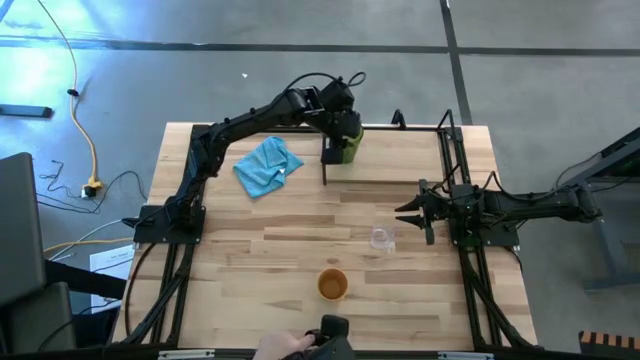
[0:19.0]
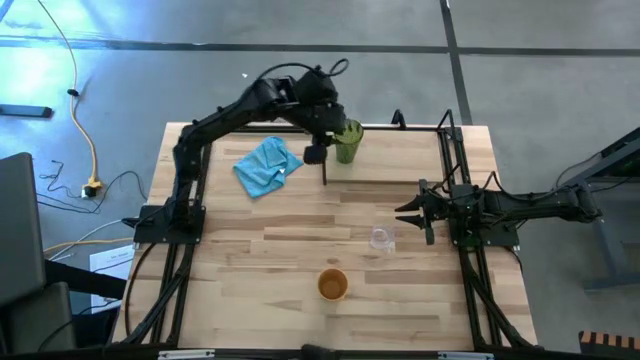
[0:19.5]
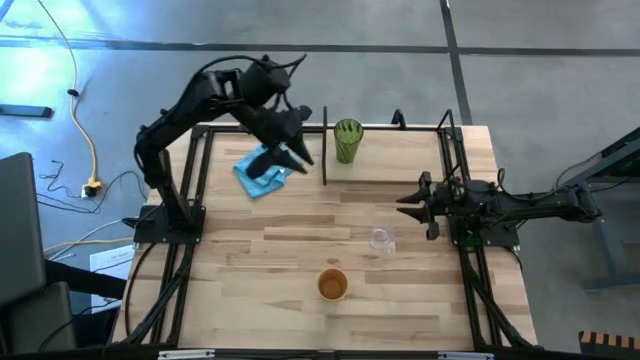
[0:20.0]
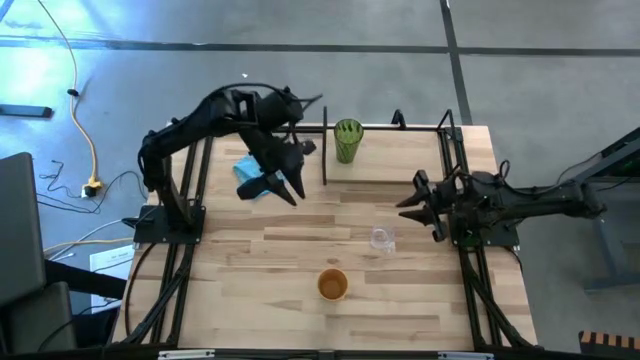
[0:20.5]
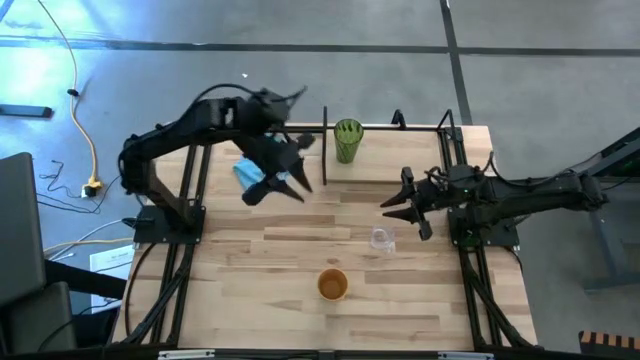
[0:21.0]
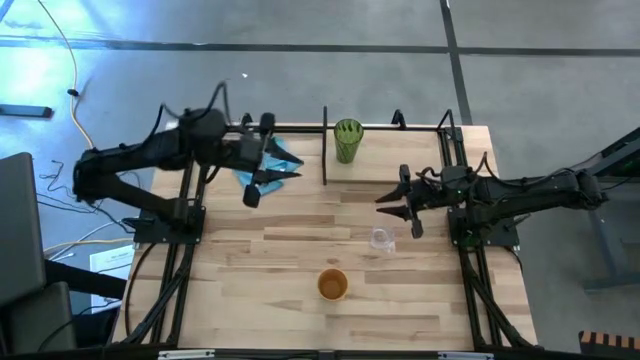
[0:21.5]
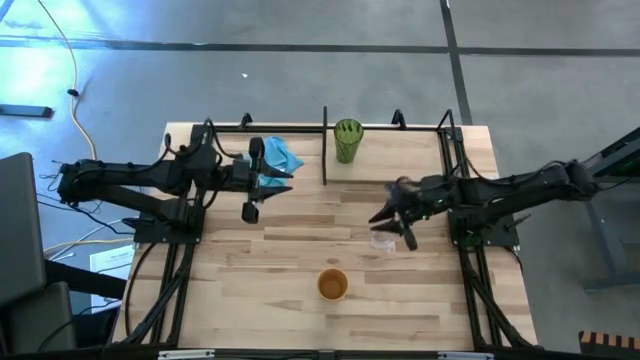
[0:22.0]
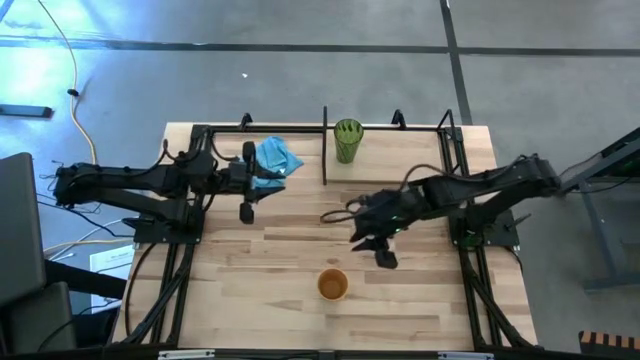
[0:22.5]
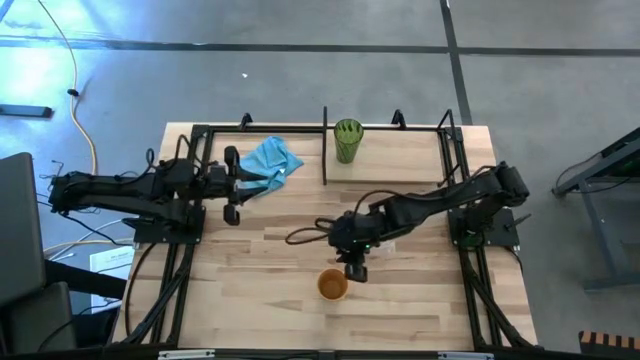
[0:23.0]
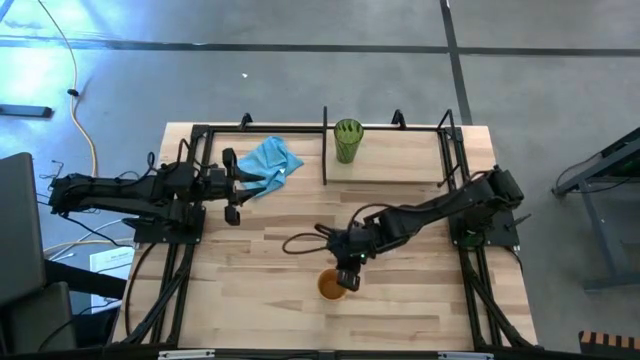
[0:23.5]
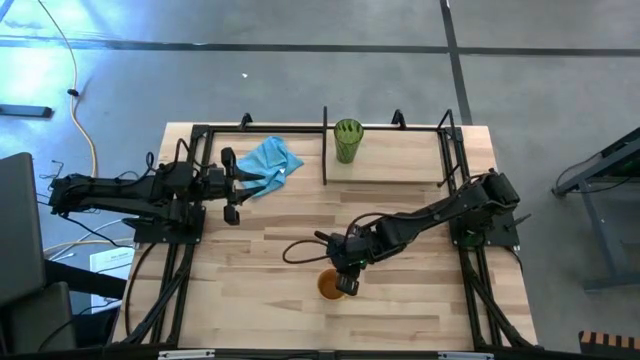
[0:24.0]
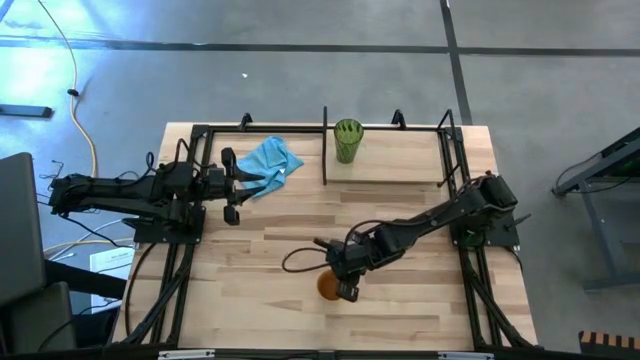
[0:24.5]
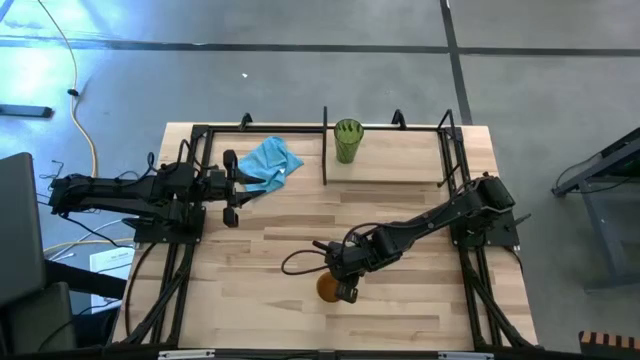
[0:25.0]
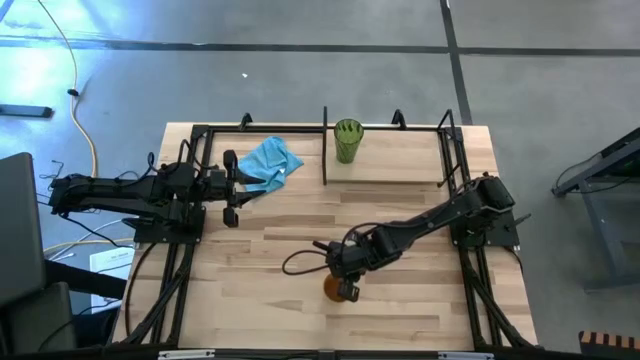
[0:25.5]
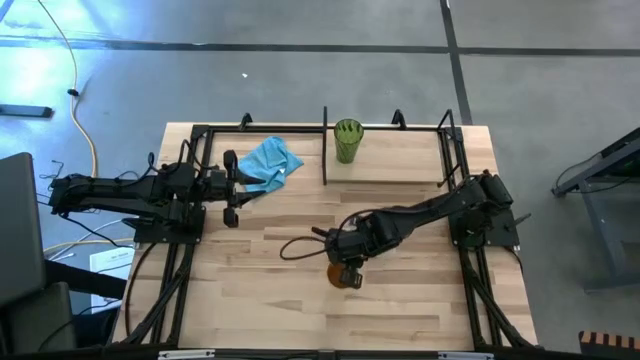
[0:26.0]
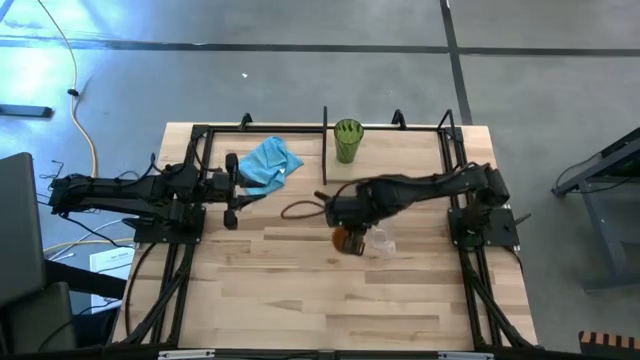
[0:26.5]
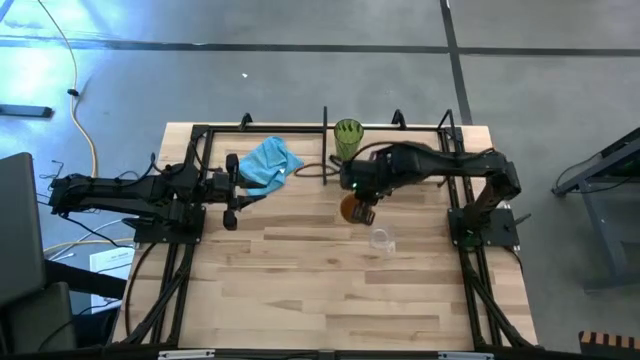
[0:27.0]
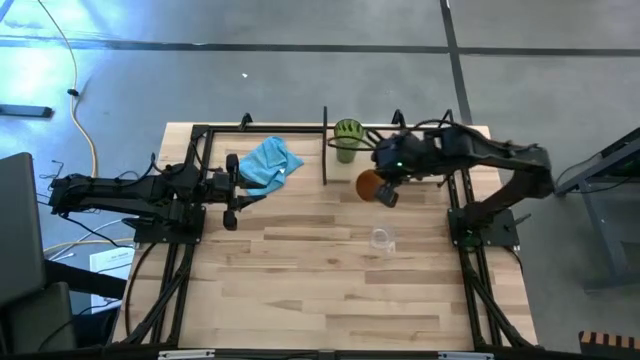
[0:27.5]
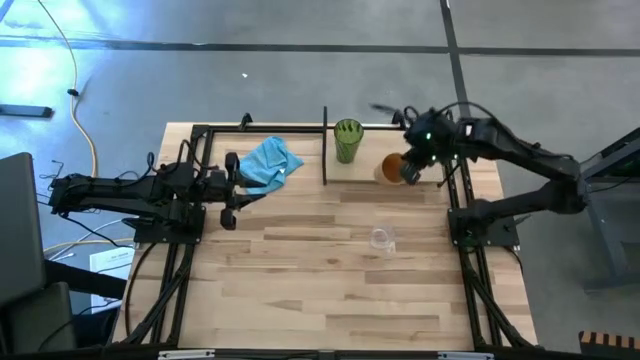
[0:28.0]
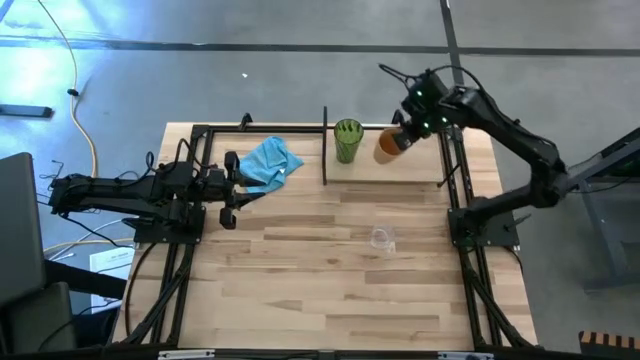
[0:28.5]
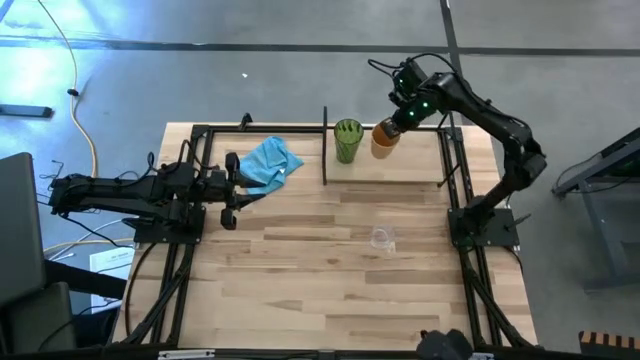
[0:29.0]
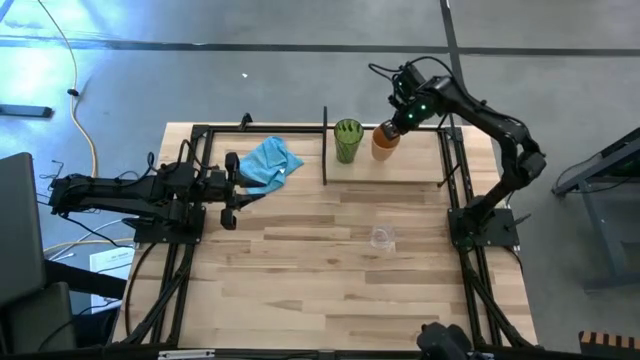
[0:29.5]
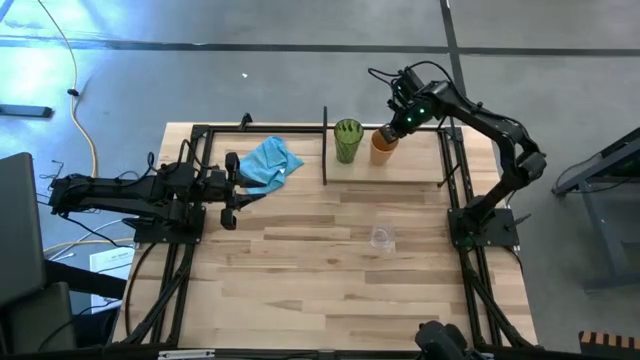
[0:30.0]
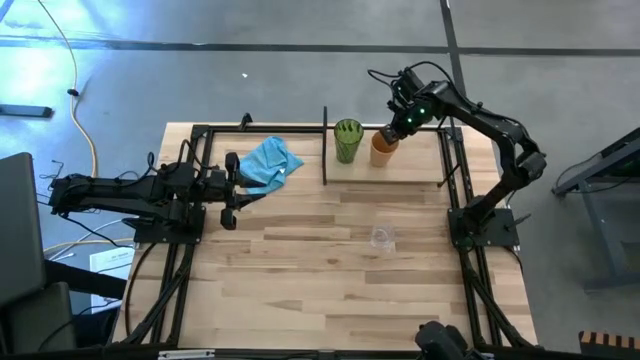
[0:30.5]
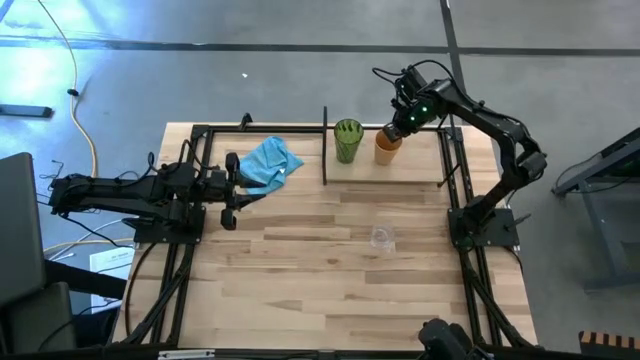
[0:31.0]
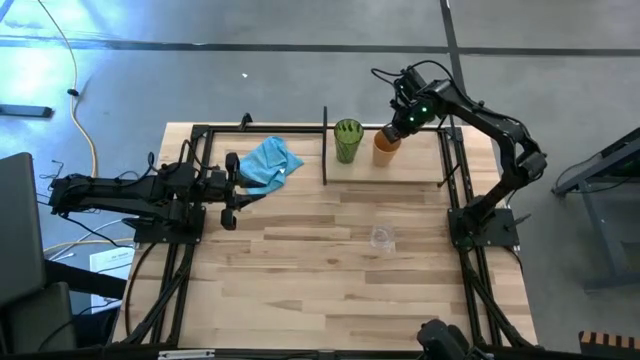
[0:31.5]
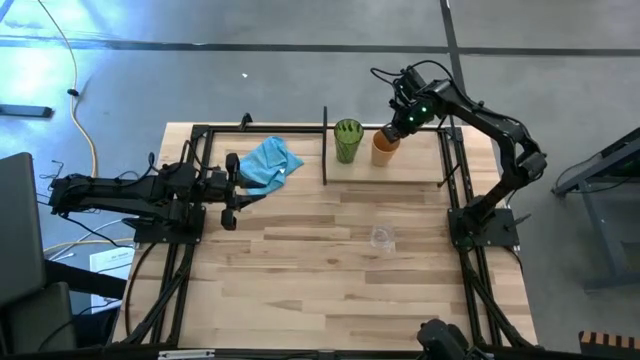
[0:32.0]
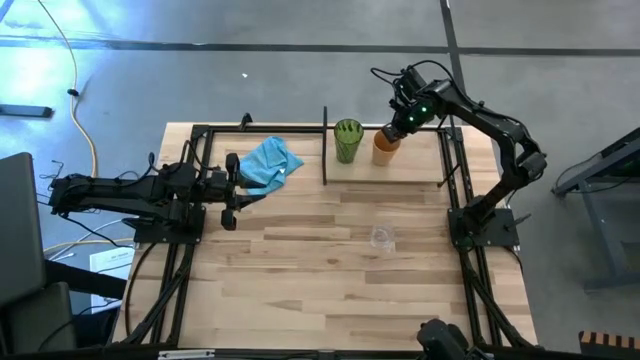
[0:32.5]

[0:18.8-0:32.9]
Task: Stack small to large cups/mugs on shelf
Put the yellow cup on the shelf

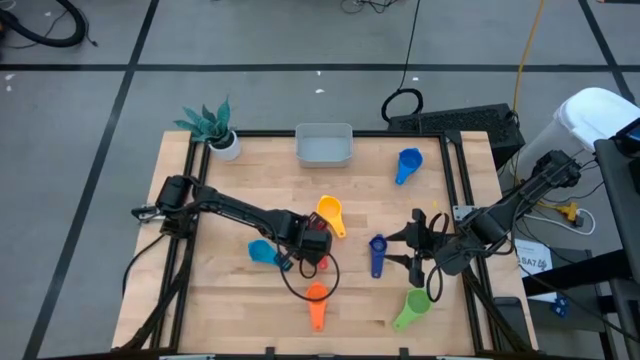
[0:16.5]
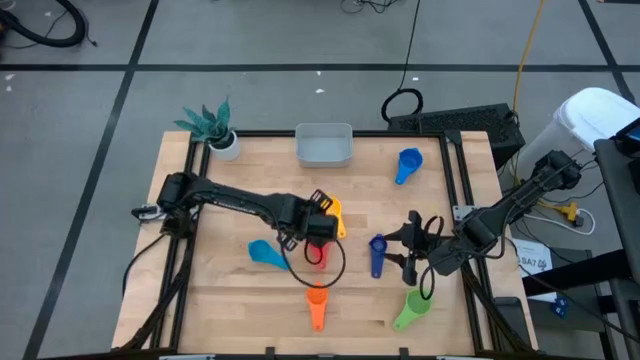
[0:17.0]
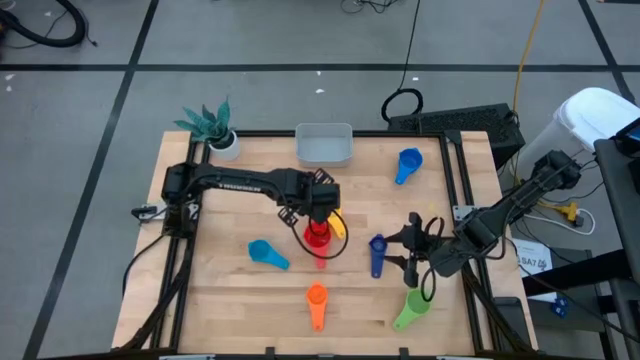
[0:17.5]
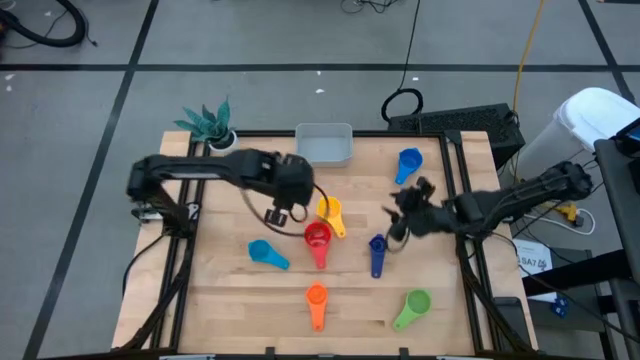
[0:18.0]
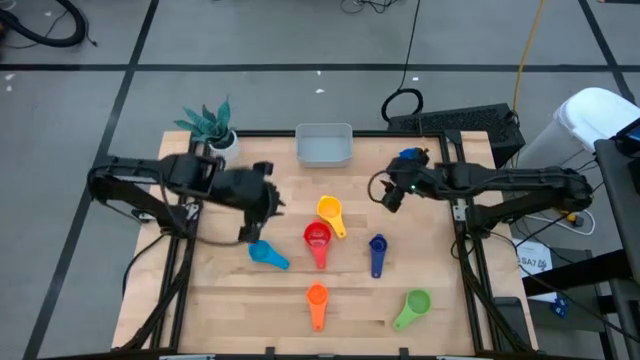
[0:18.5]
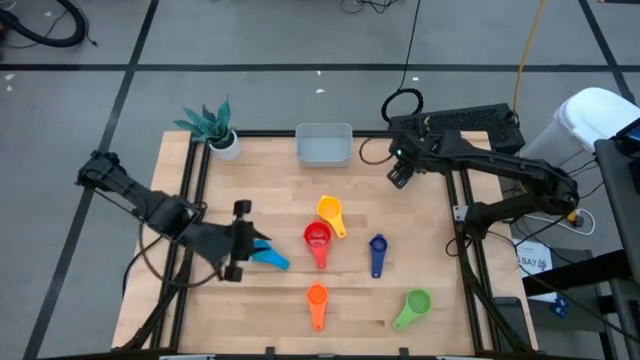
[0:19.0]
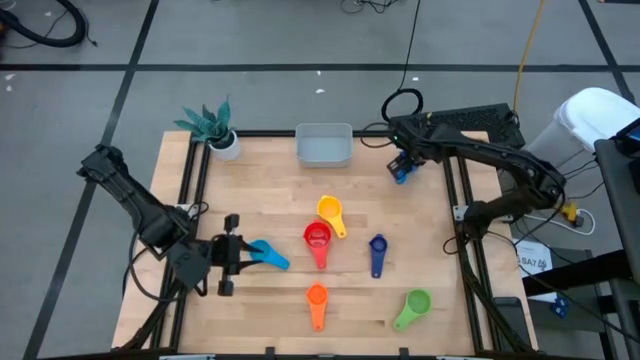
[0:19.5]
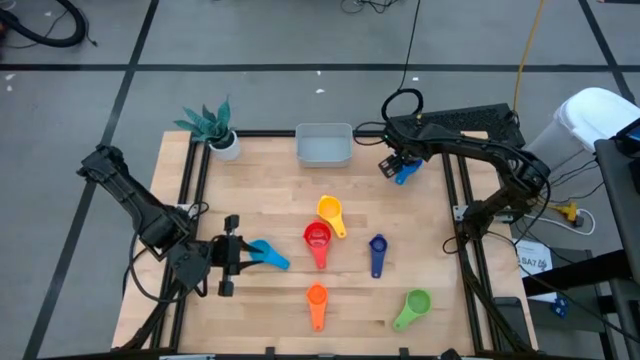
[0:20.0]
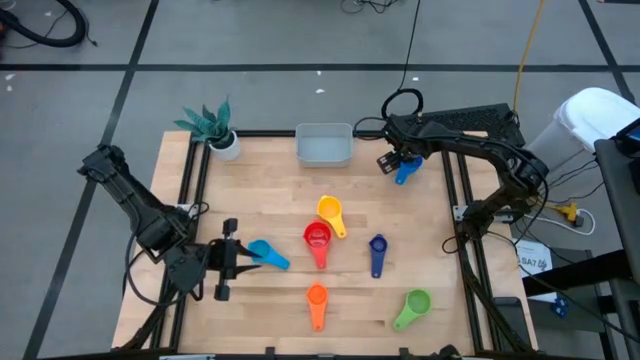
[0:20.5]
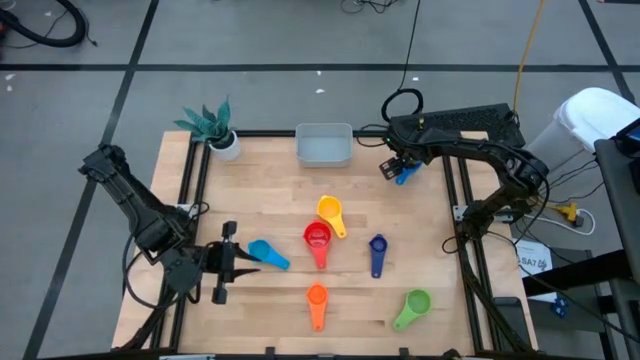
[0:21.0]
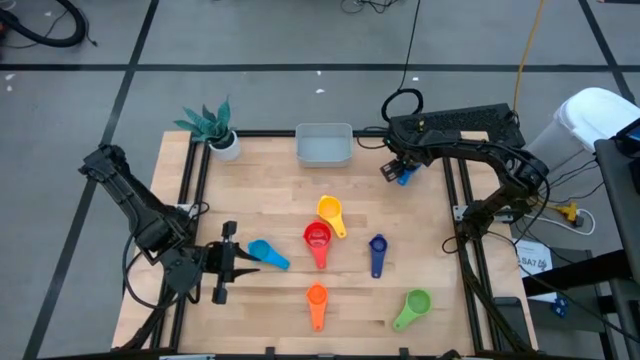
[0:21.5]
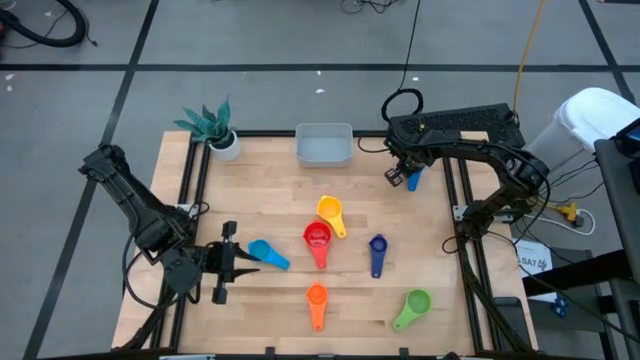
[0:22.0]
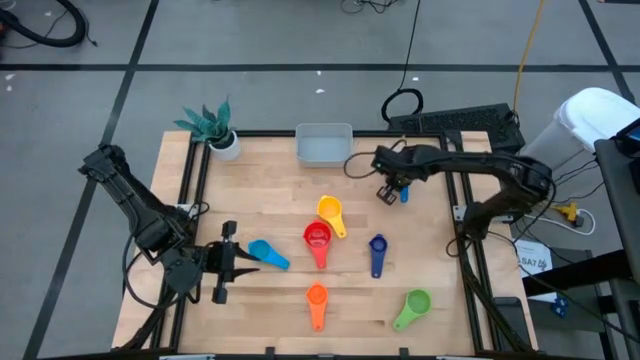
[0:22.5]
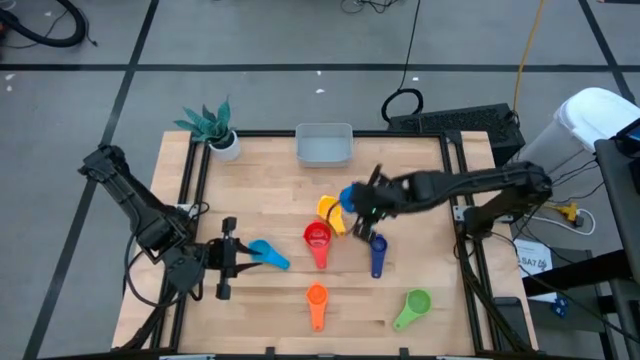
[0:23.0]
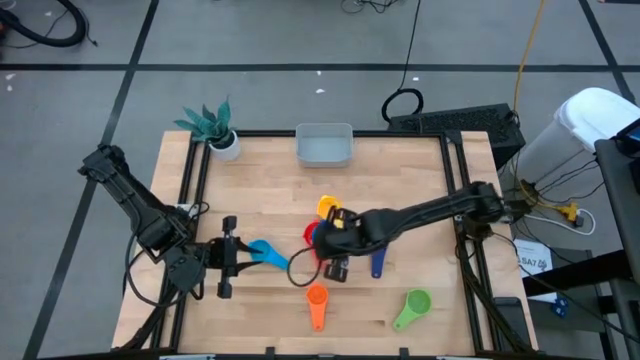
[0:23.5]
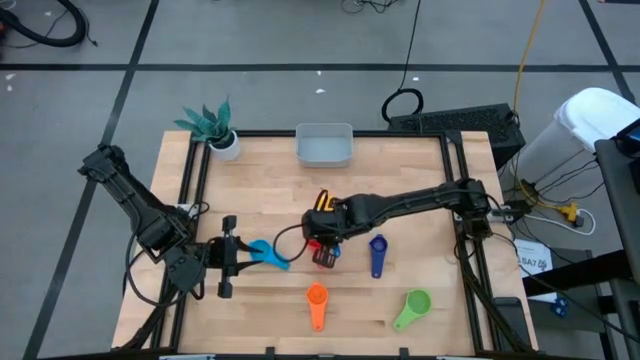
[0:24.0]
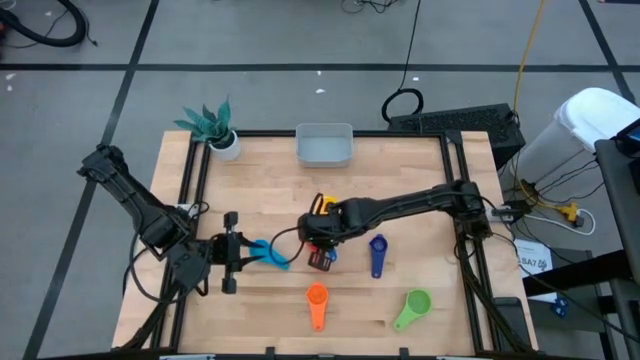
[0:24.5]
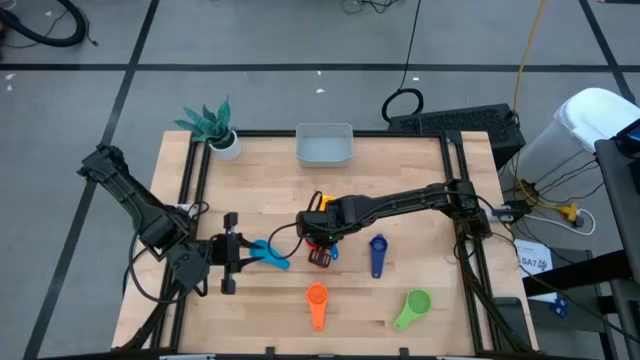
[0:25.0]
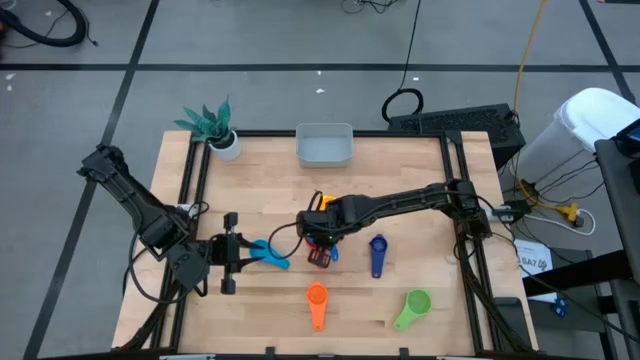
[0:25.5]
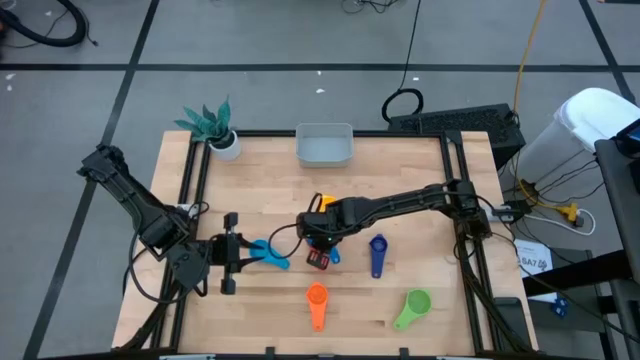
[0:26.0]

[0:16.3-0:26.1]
Task: Nest measuring cups in basket
Stack the blue measuring cup on top of the red measuring cup
